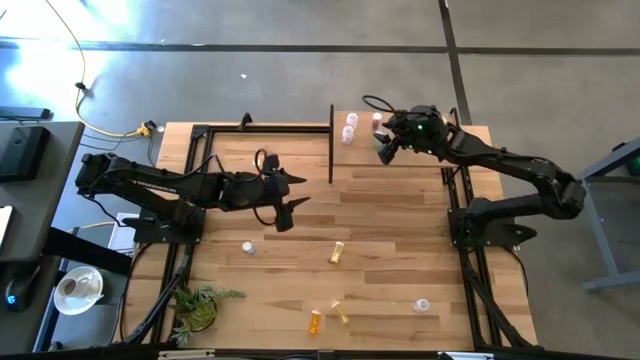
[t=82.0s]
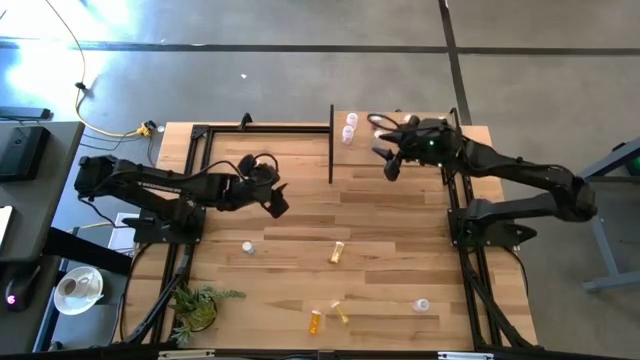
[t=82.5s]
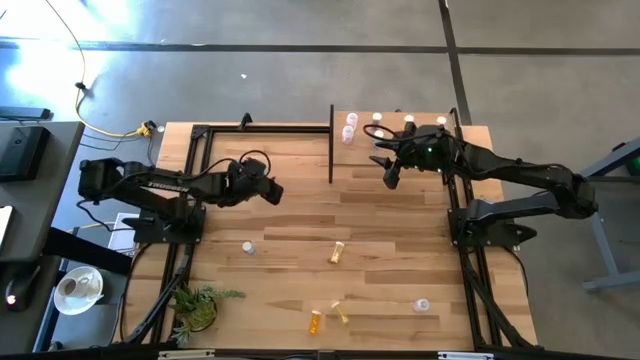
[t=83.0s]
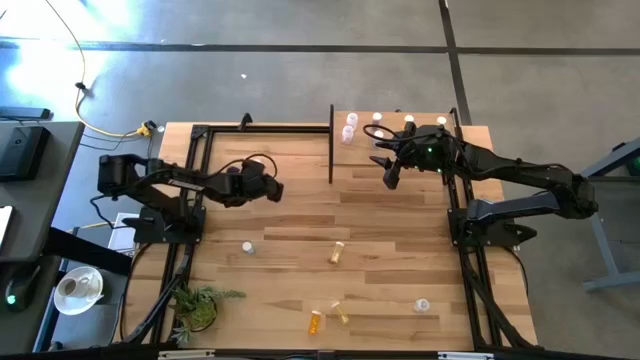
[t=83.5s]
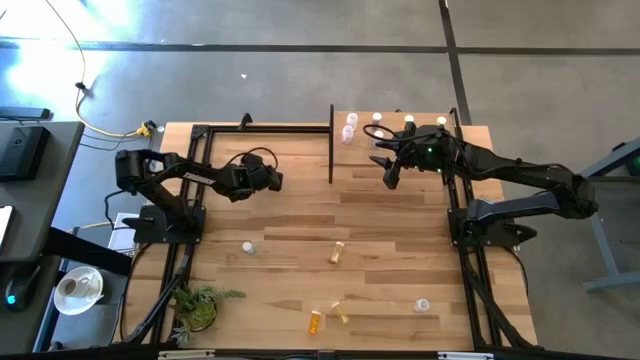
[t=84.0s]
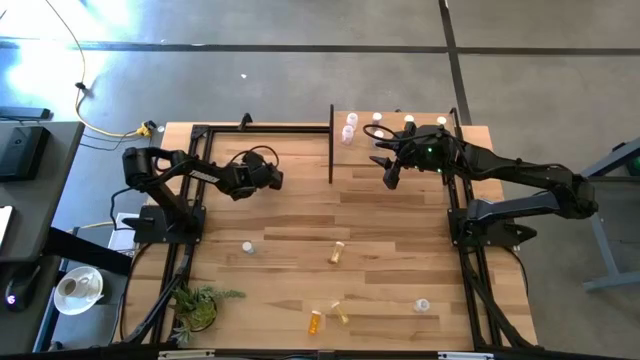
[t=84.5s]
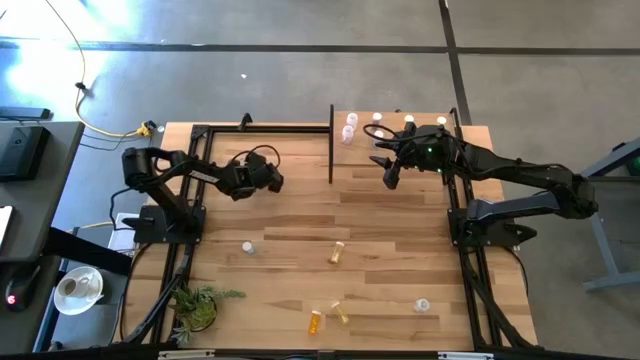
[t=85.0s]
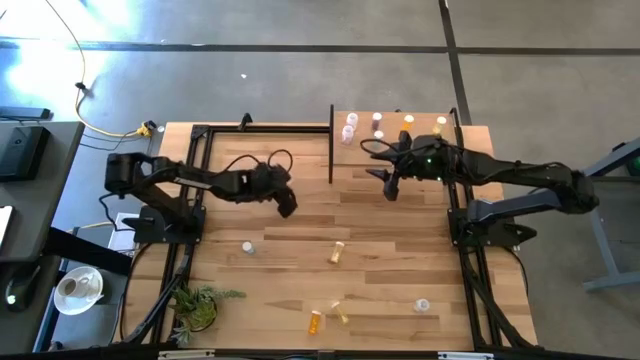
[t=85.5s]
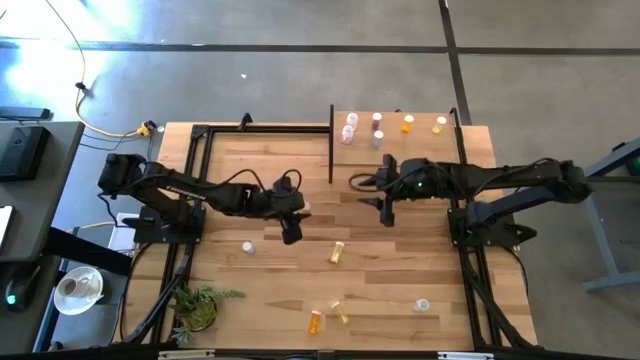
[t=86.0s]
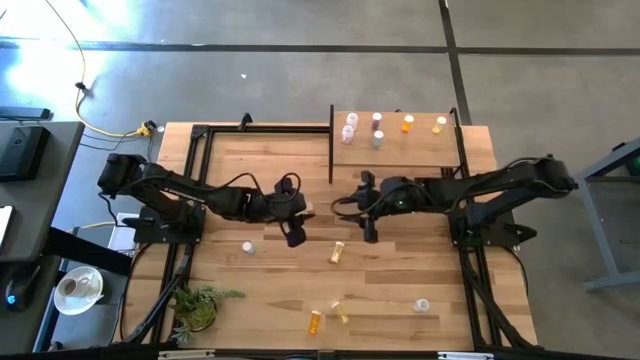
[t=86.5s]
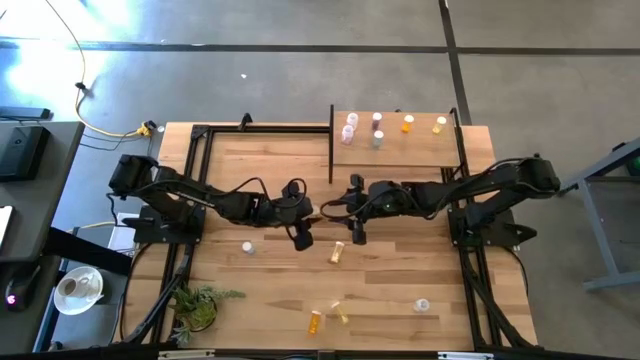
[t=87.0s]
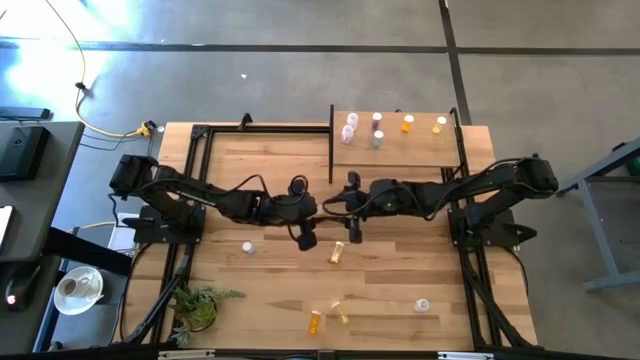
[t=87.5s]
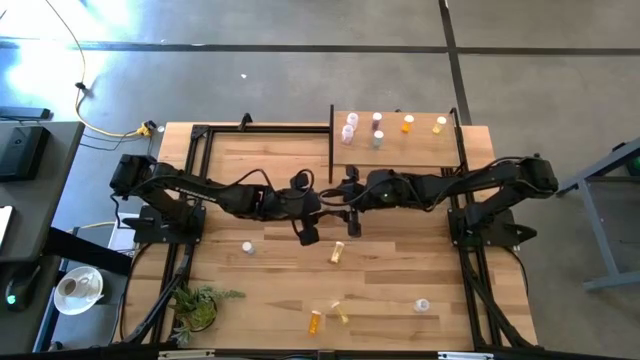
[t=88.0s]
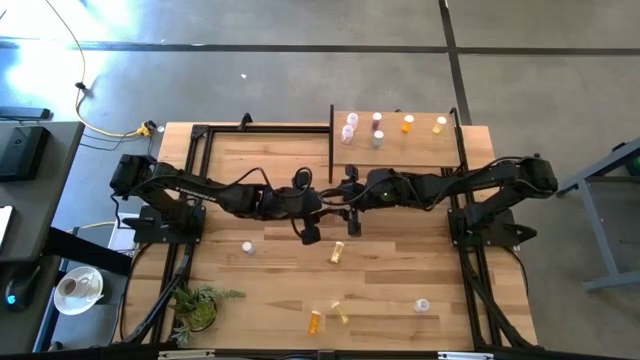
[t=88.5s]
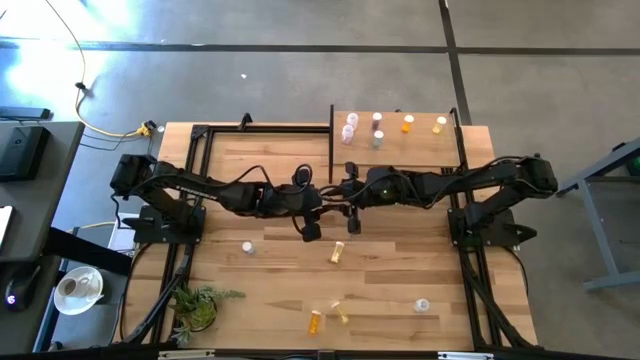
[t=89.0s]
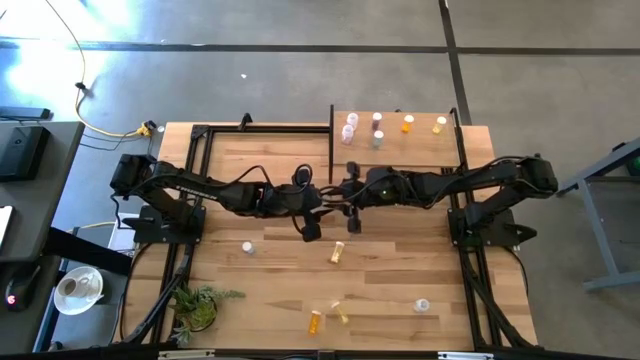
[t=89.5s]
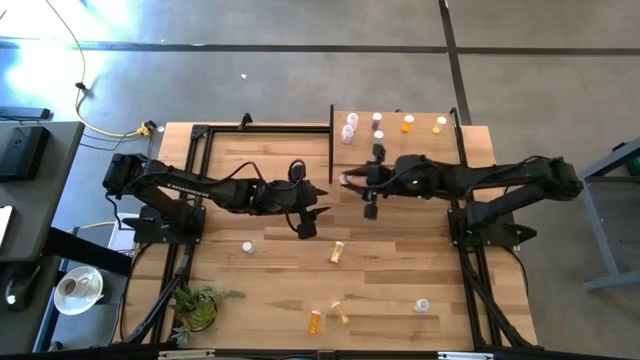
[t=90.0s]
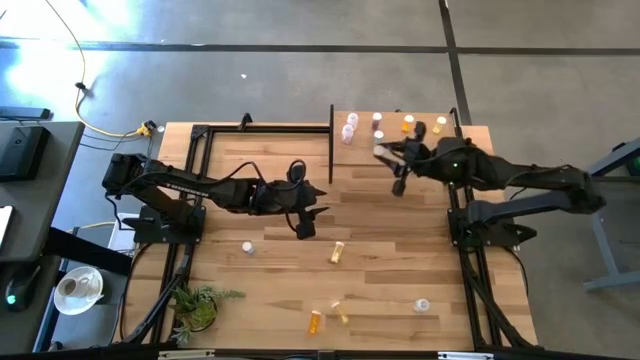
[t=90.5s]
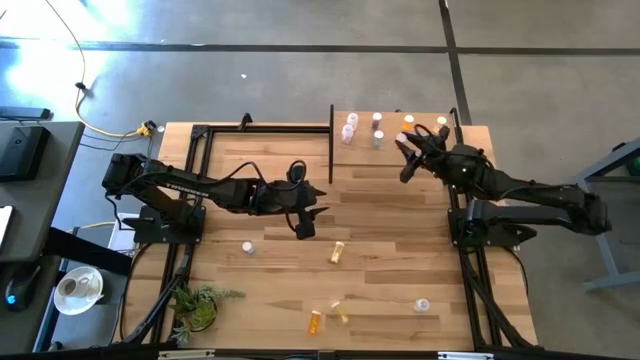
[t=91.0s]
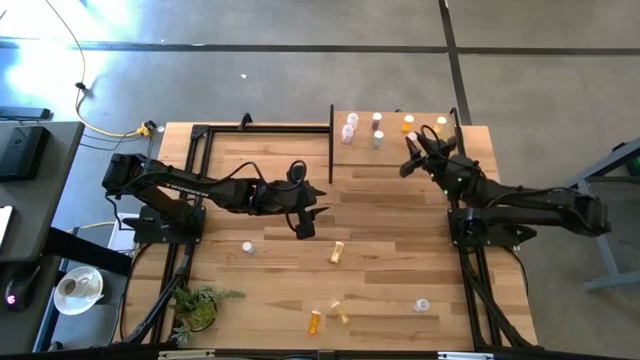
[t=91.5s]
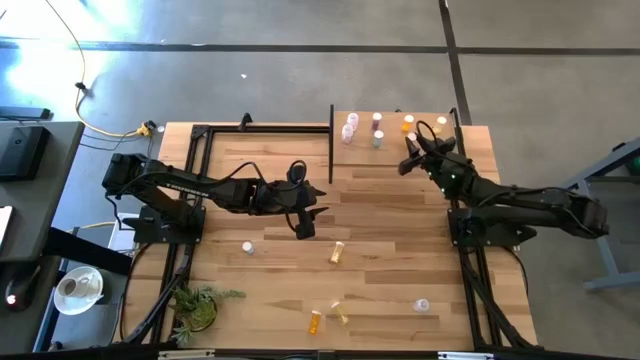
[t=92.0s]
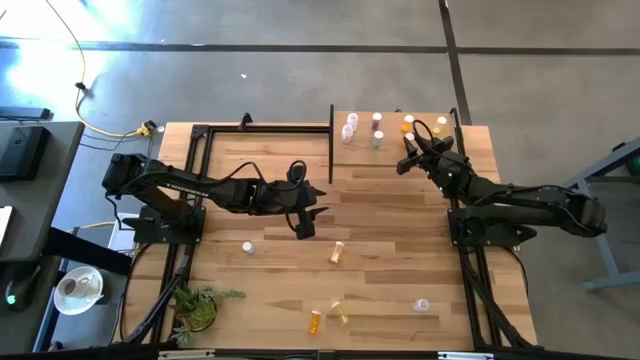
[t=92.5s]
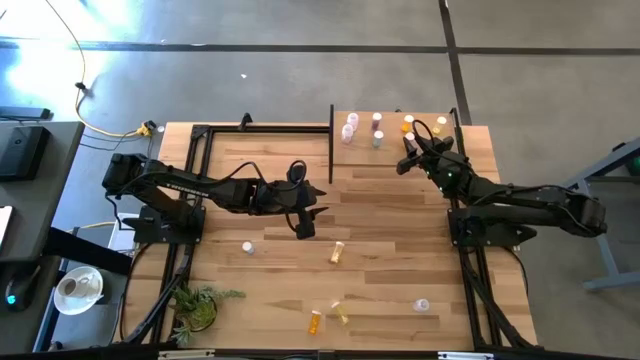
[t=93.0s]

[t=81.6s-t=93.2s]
Task: Pick and place medicine bottles onto shelf by color
Put the top orange pill bottle on the shelf aligned with the other orange pill bottle

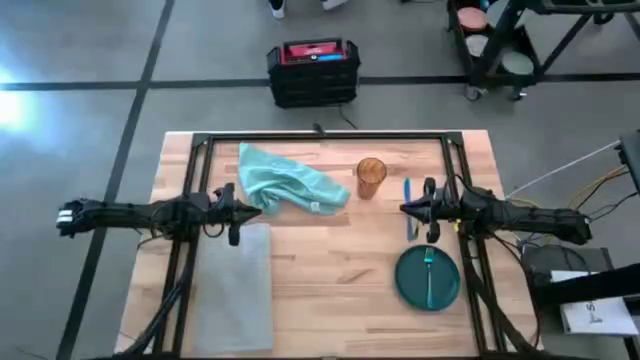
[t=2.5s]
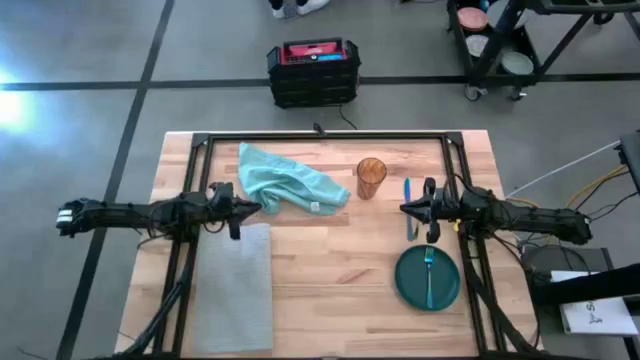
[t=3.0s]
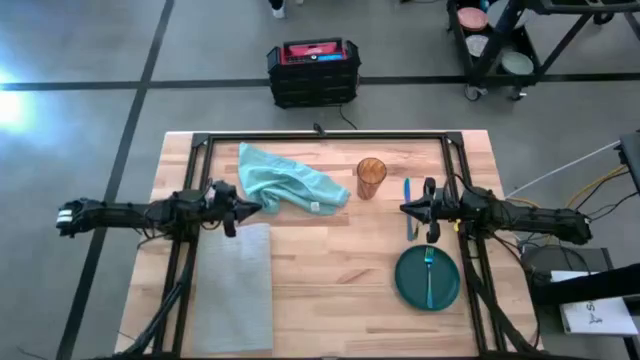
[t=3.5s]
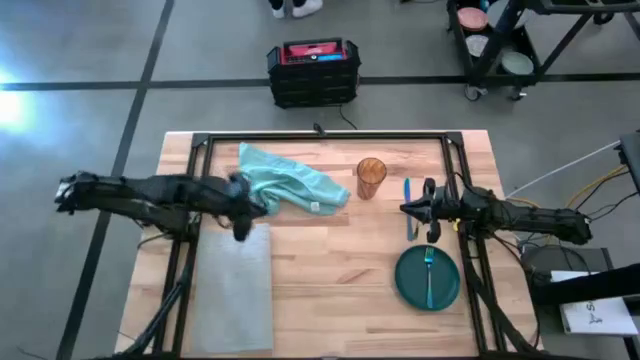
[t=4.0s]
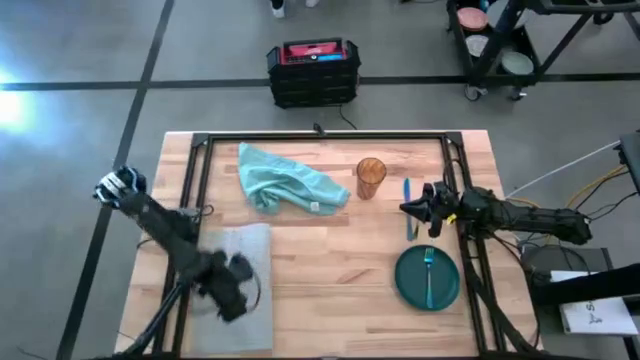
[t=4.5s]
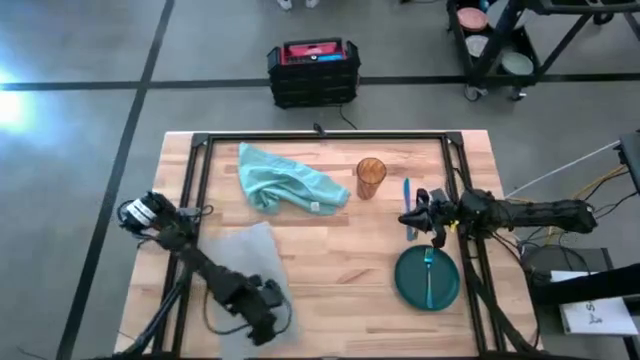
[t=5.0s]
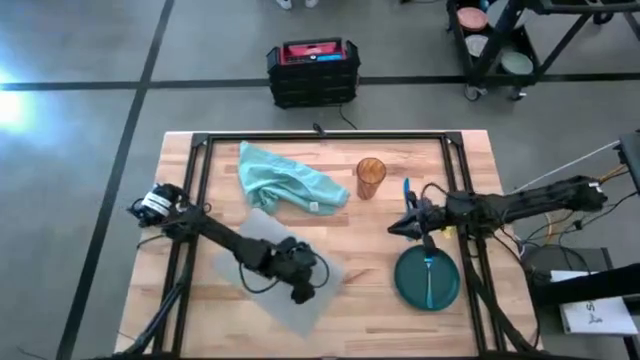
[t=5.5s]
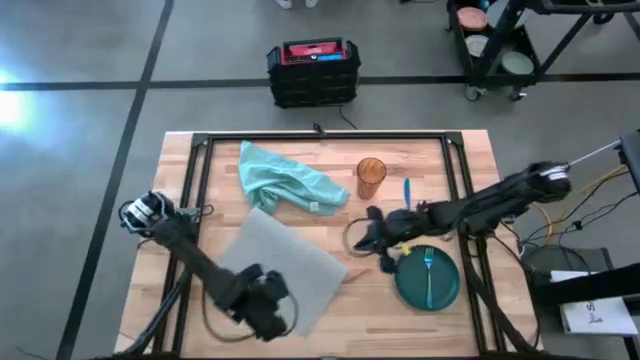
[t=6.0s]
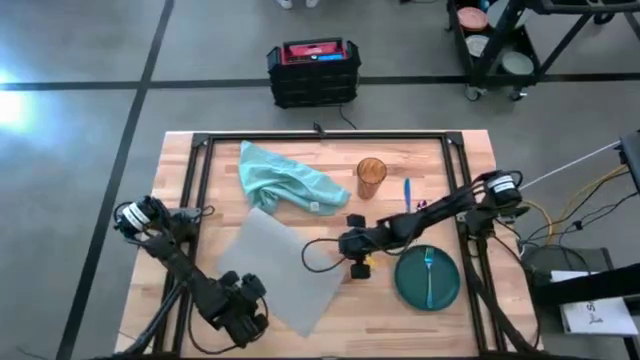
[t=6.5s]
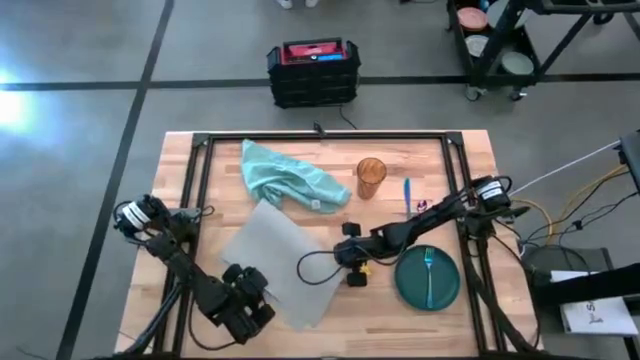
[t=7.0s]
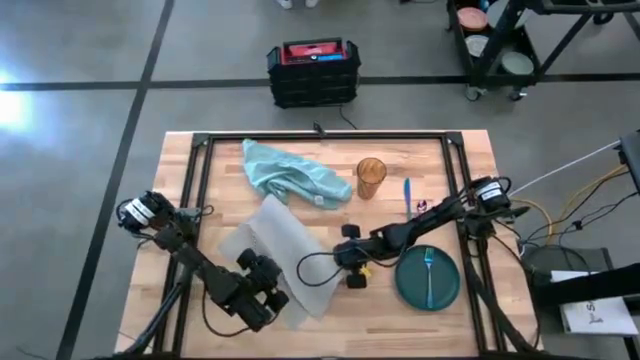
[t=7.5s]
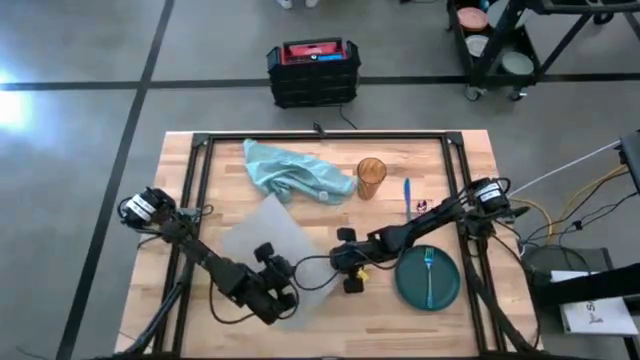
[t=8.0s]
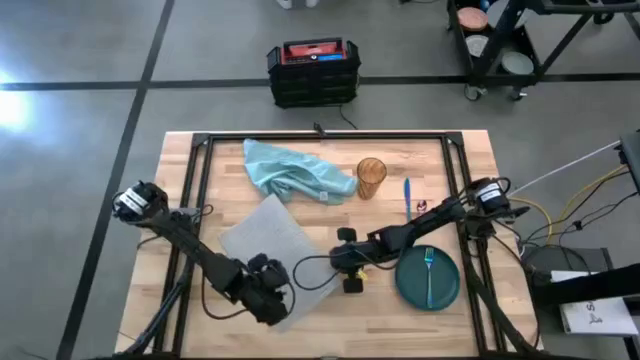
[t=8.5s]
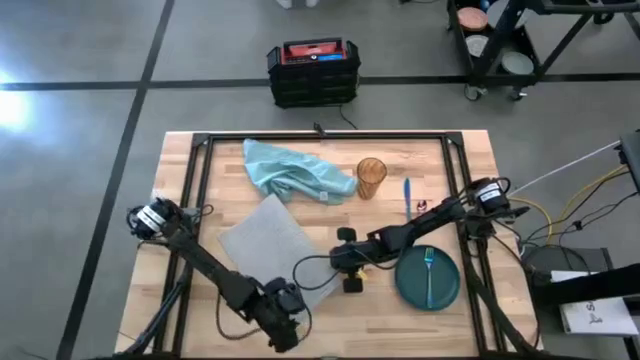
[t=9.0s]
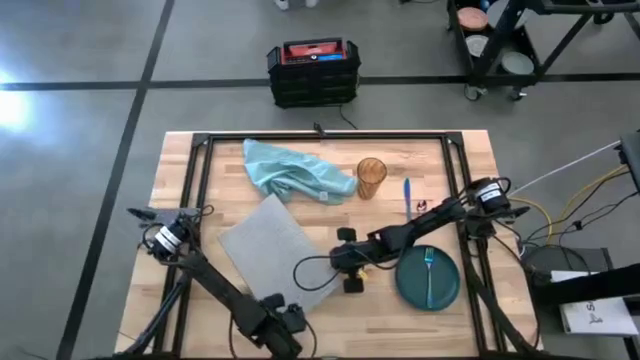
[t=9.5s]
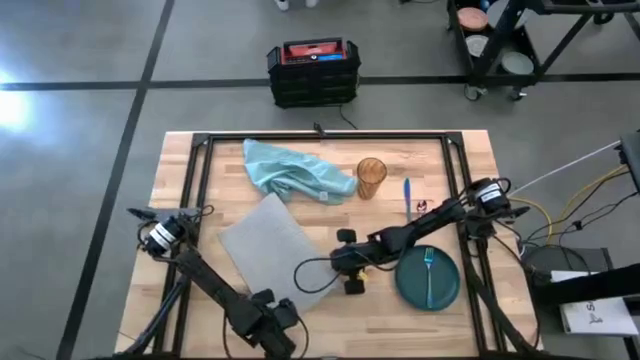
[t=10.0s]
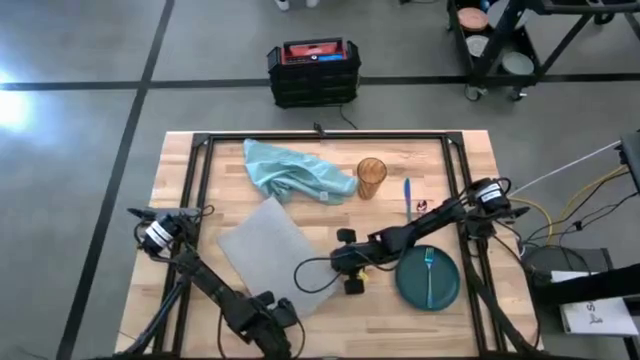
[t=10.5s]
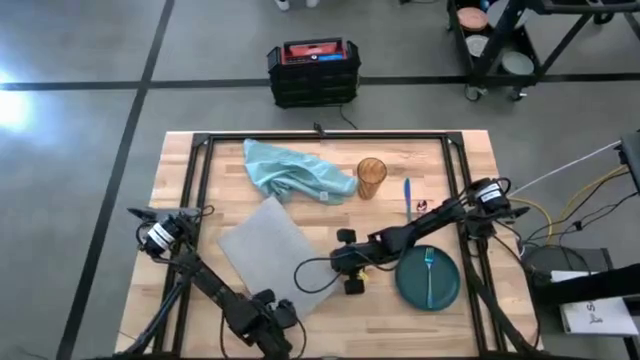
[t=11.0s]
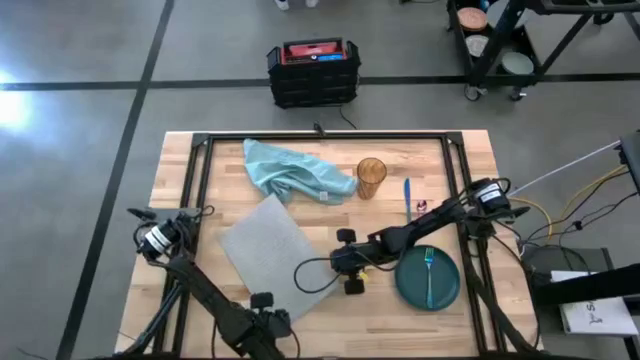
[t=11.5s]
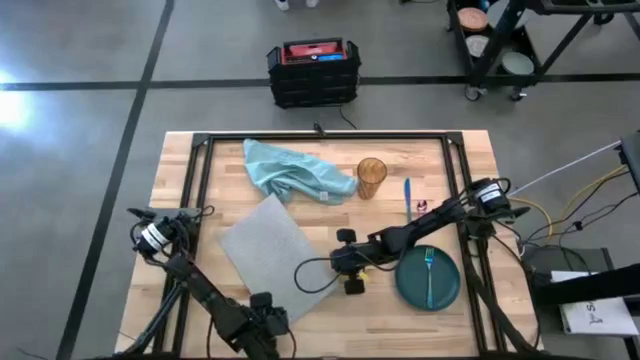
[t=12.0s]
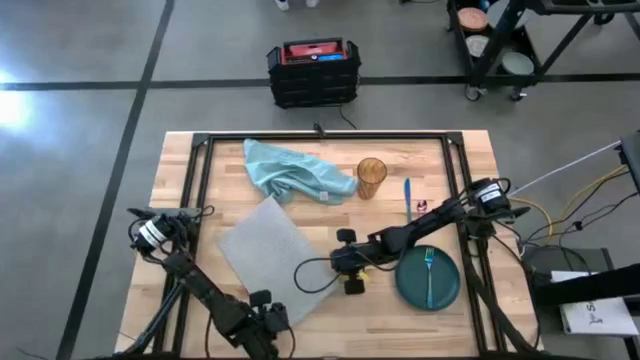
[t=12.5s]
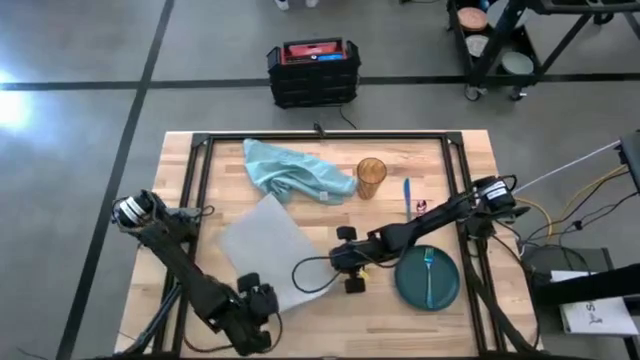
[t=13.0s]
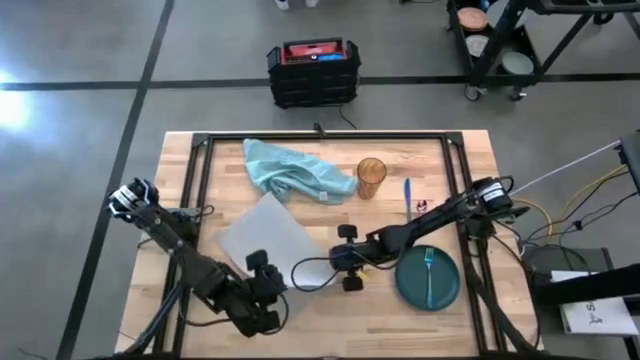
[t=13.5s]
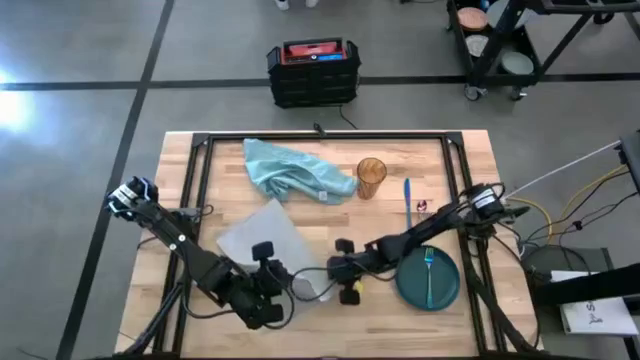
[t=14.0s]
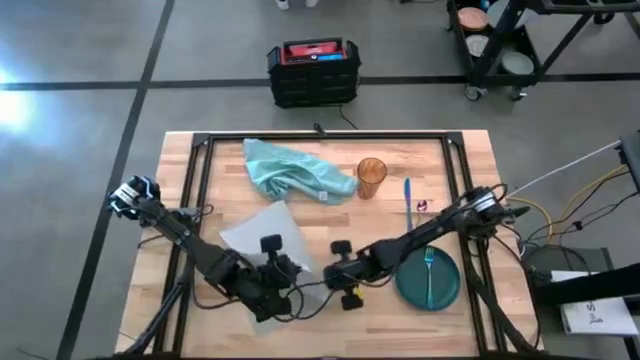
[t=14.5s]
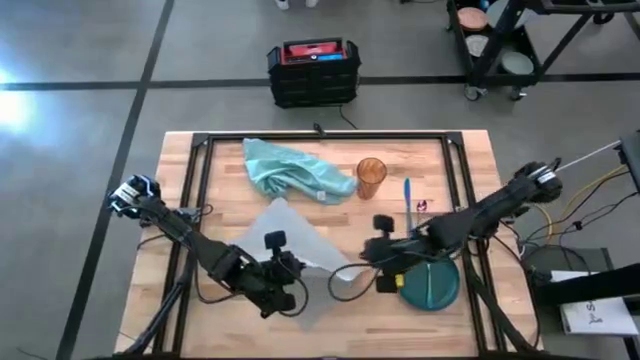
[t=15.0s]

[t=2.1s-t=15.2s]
Task: Set table place
Prepare the gray table mat
